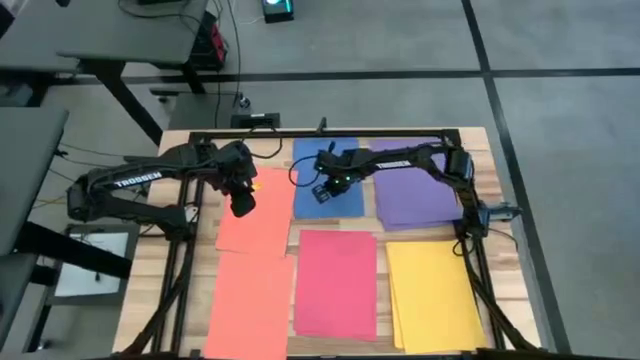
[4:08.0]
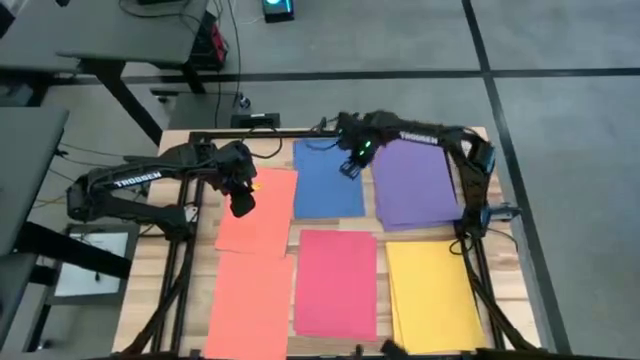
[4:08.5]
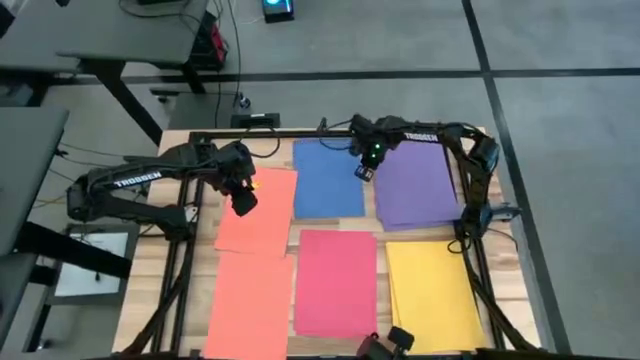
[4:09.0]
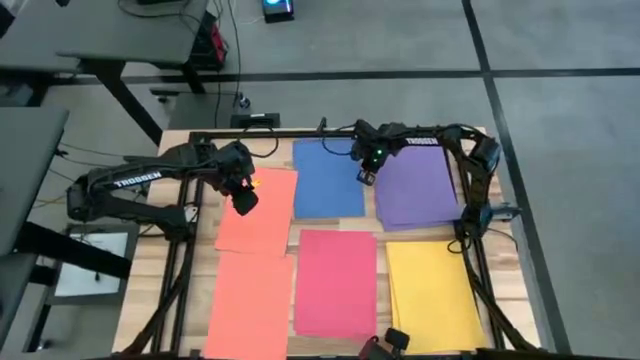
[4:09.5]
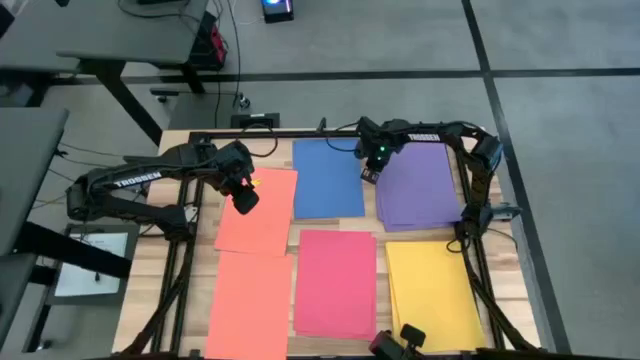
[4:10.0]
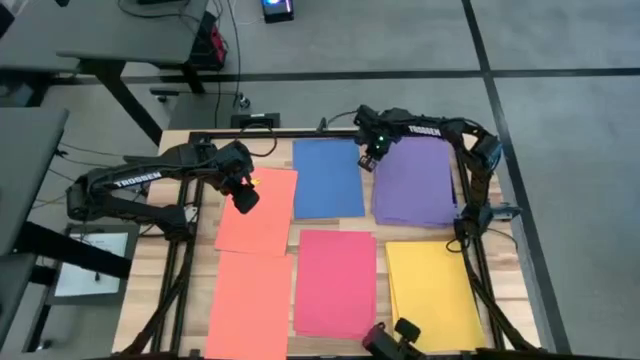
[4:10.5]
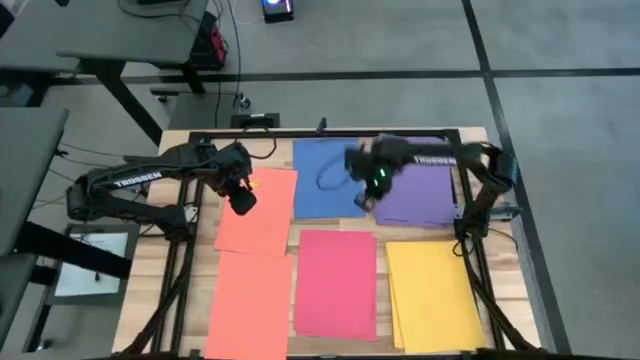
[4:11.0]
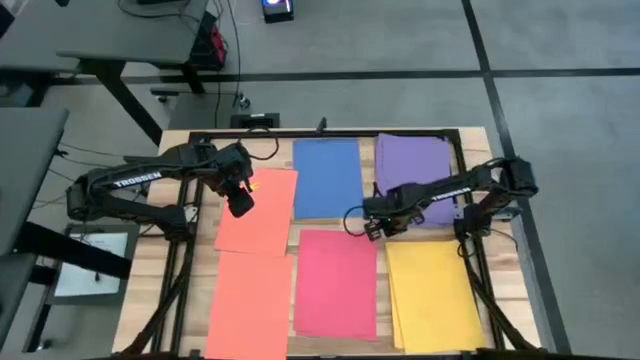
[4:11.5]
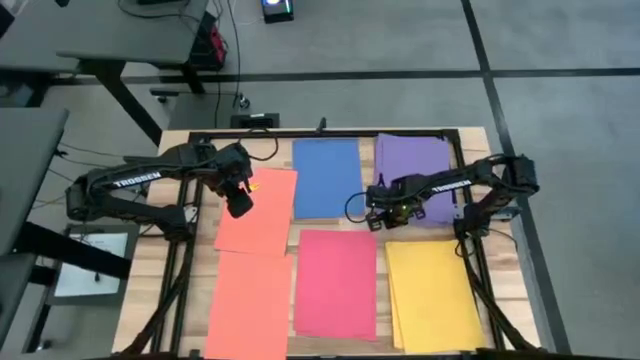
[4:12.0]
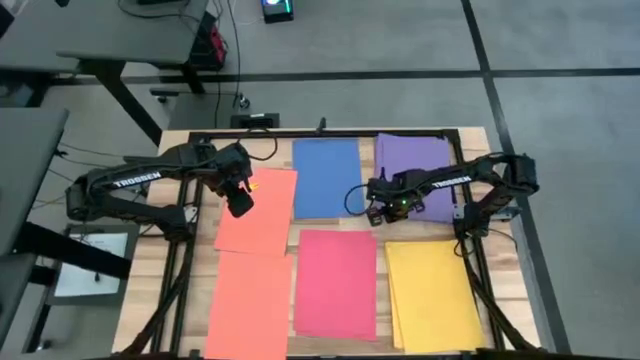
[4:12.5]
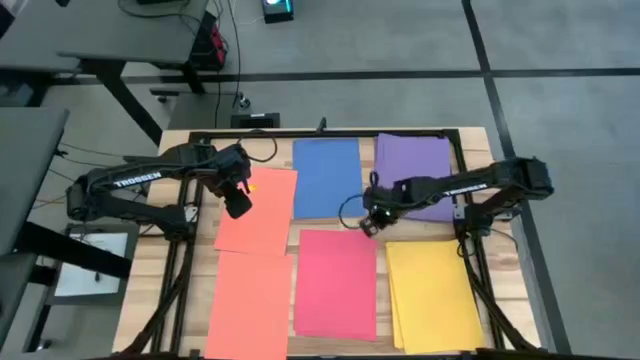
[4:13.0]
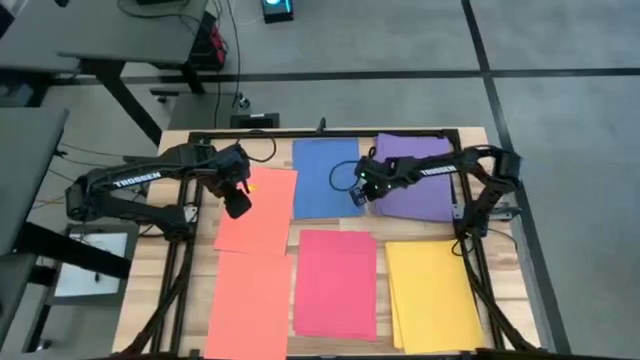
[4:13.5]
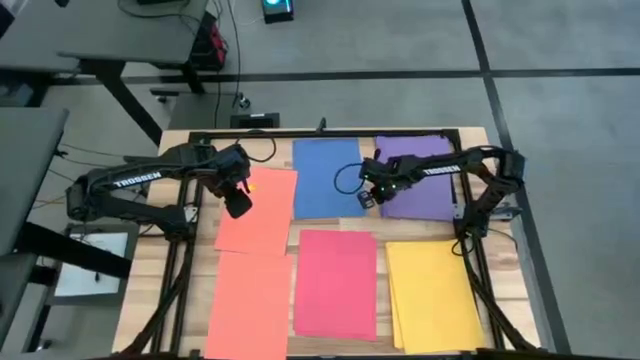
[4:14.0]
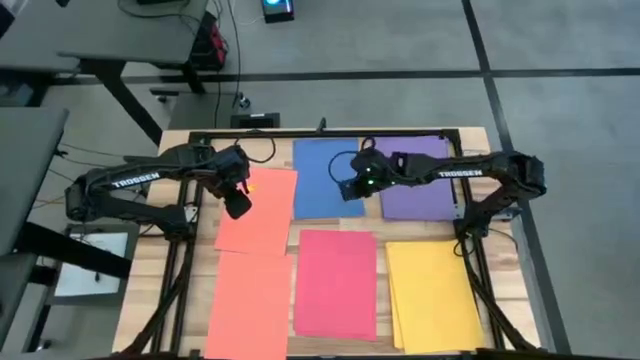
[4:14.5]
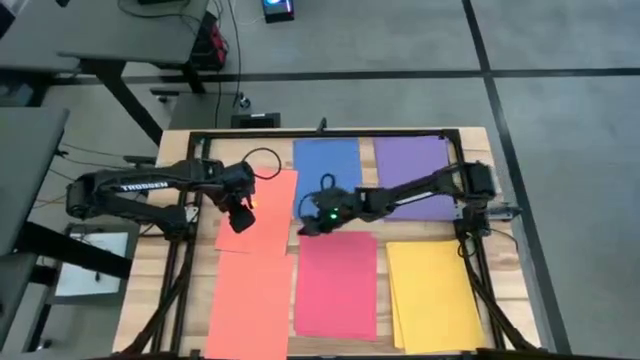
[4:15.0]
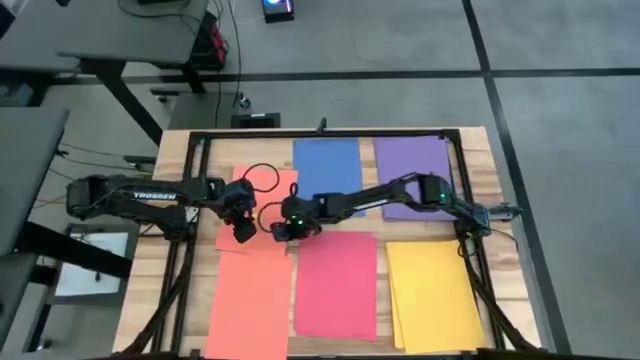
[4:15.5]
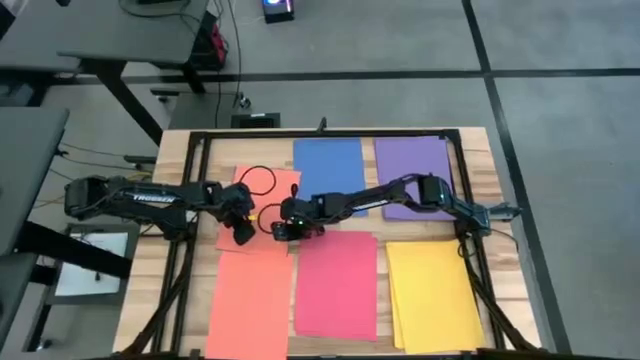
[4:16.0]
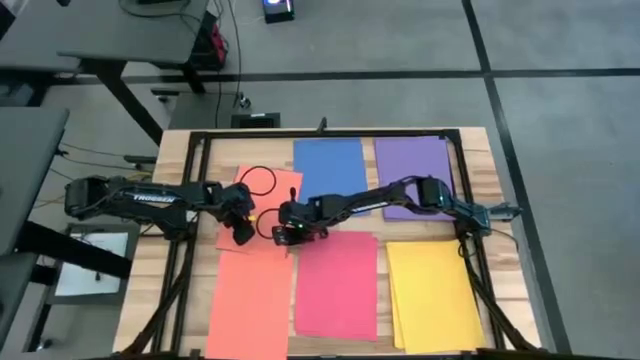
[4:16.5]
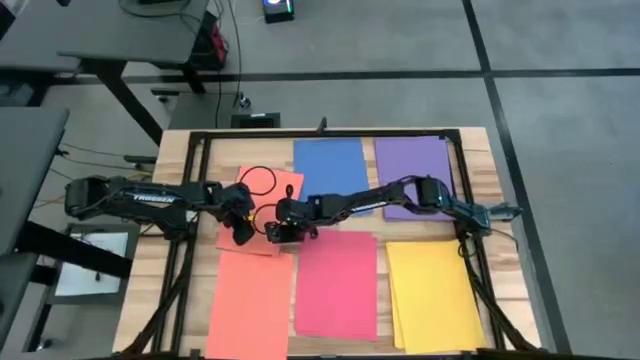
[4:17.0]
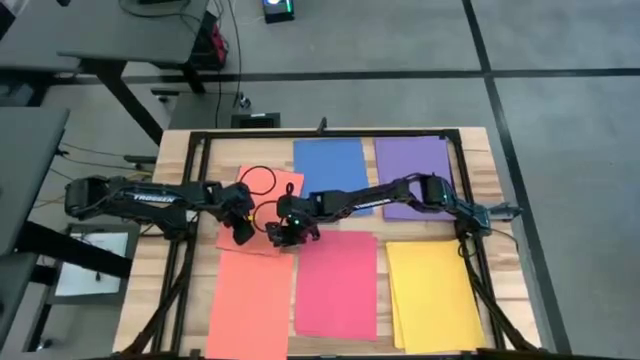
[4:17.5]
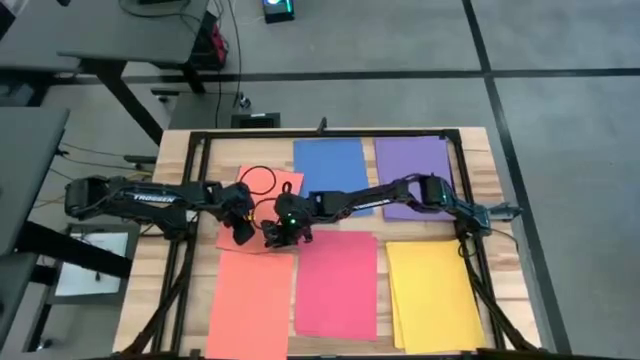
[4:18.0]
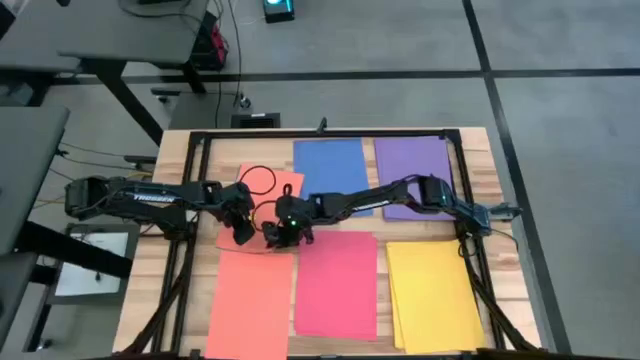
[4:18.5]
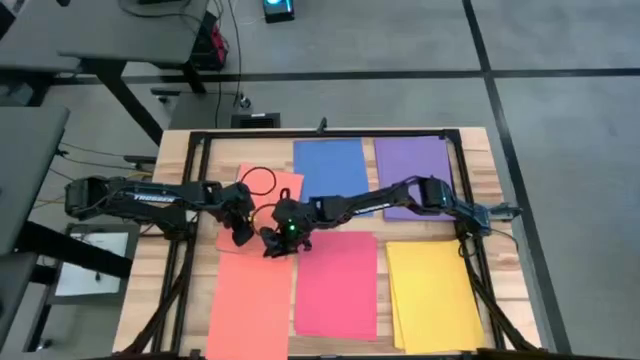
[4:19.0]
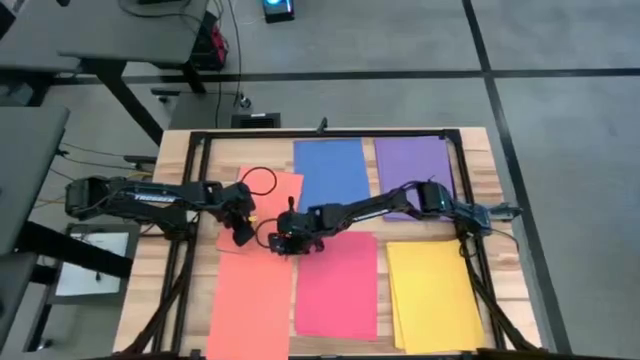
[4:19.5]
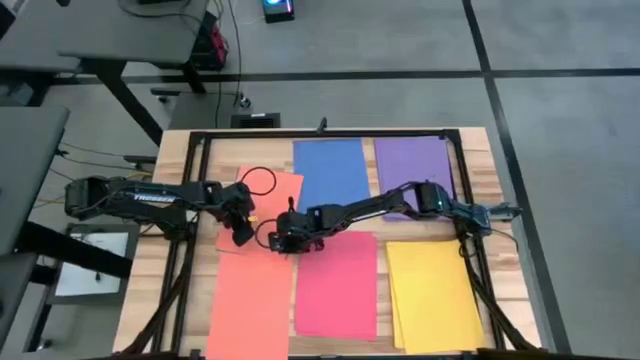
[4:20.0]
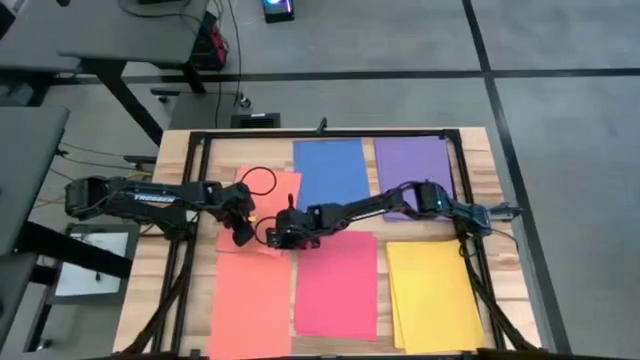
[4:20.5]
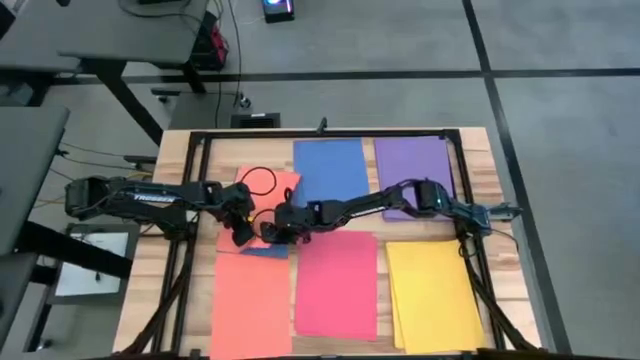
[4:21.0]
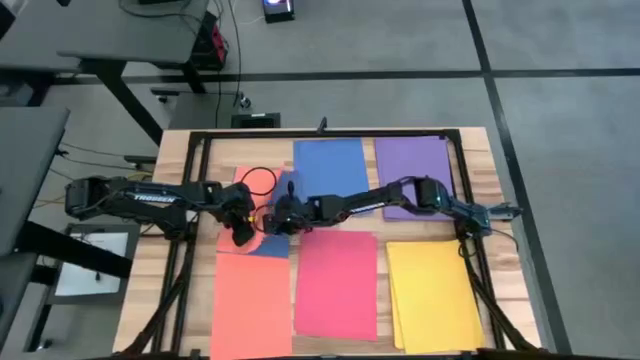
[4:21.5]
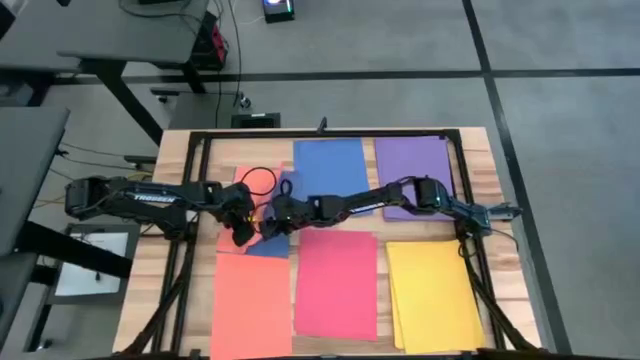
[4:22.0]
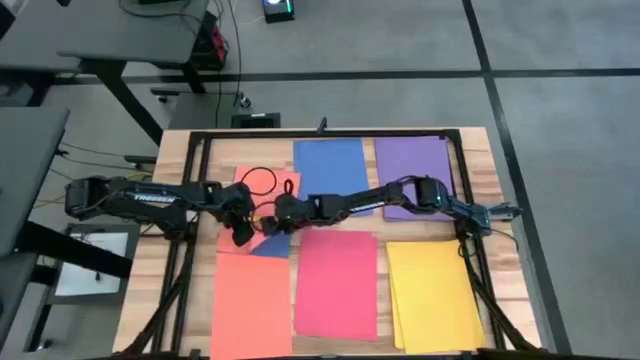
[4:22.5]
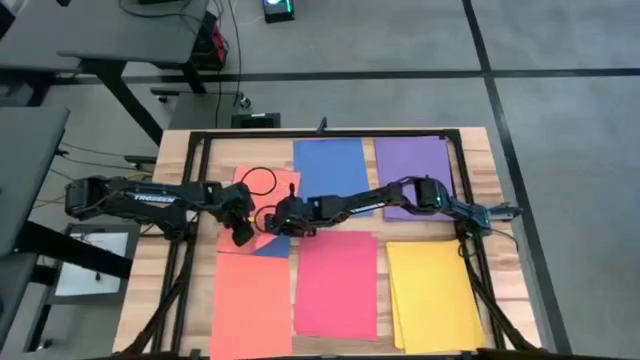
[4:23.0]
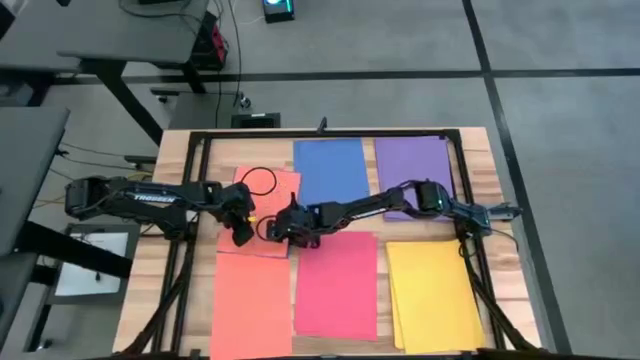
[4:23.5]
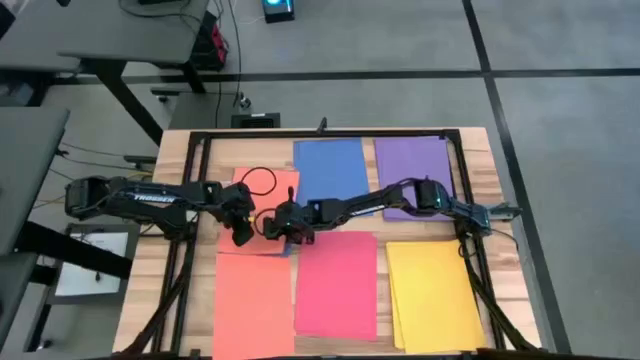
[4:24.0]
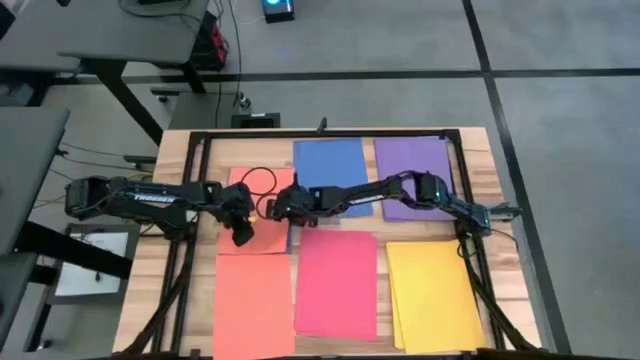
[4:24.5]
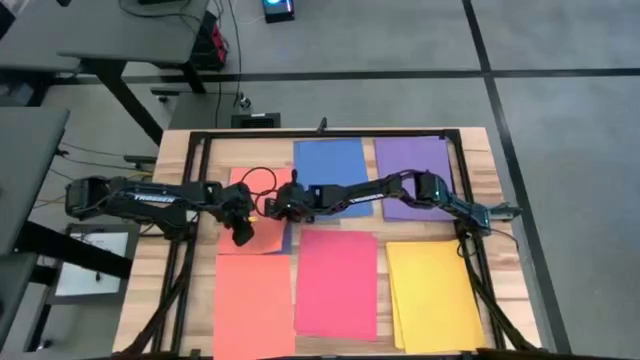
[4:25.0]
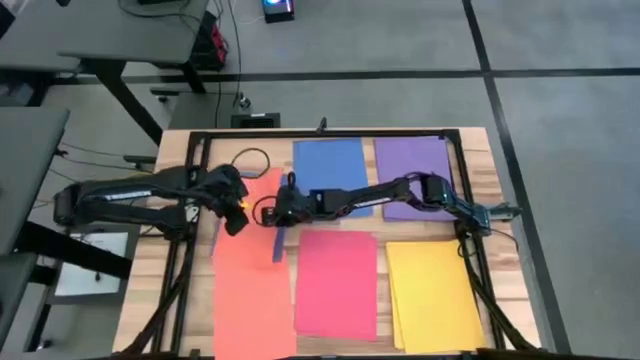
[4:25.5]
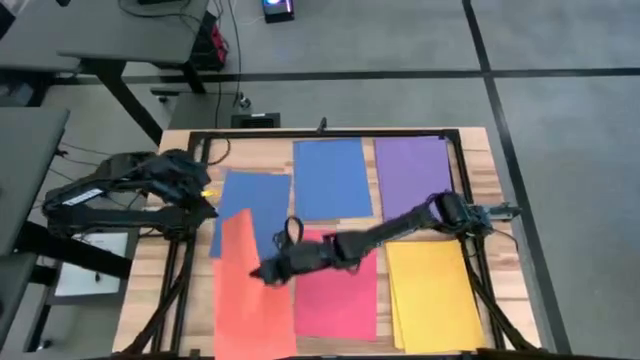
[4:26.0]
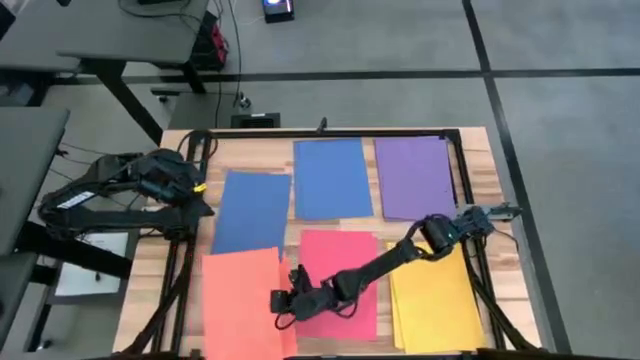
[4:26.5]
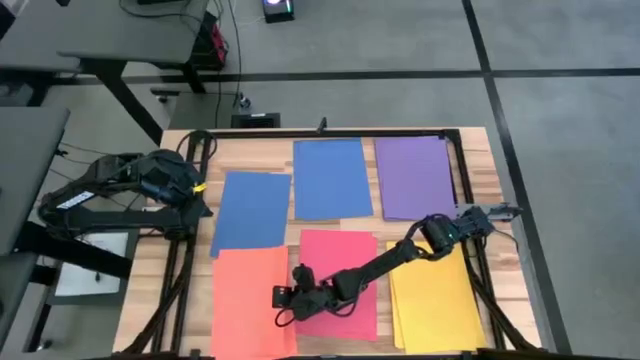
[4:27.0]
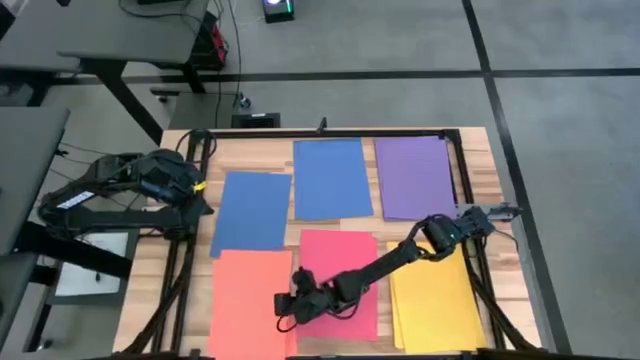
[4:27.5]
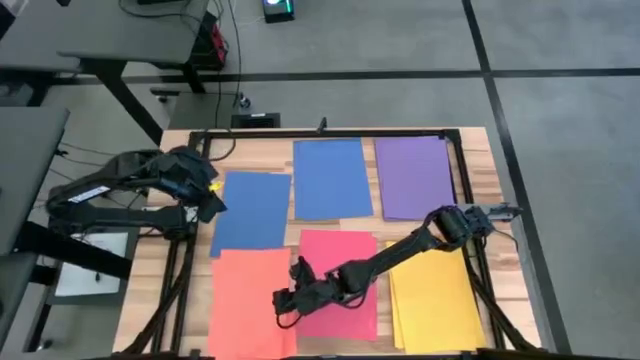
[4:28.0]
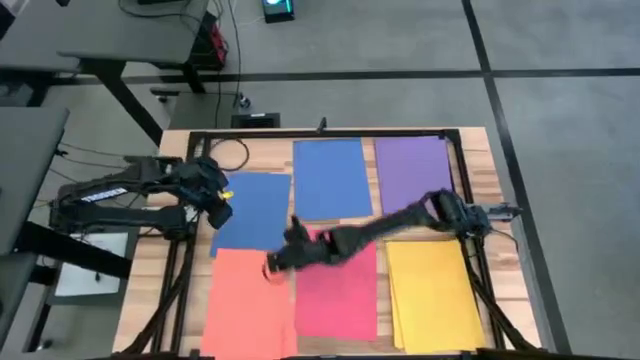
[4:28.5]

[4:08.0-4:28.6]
Task: Organize paper
Stack the orange paper on the bottom left light orange papers

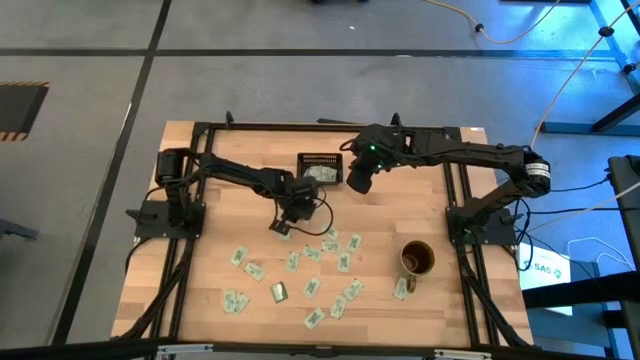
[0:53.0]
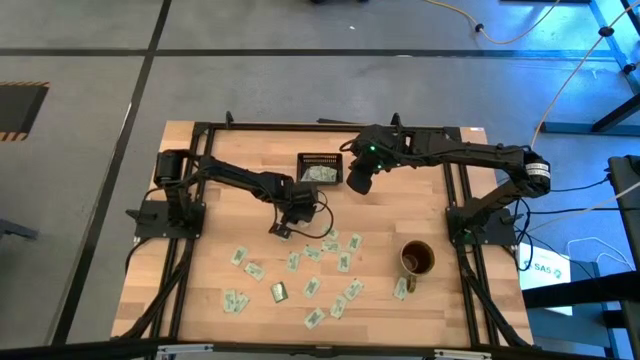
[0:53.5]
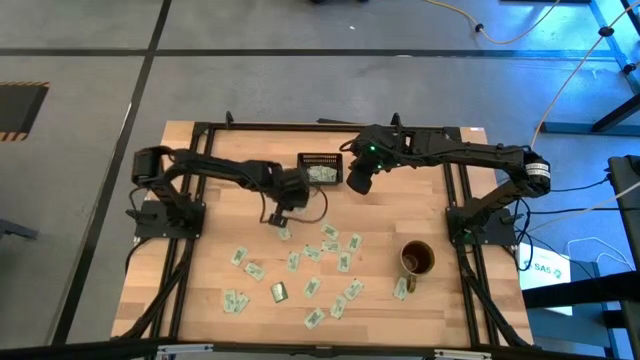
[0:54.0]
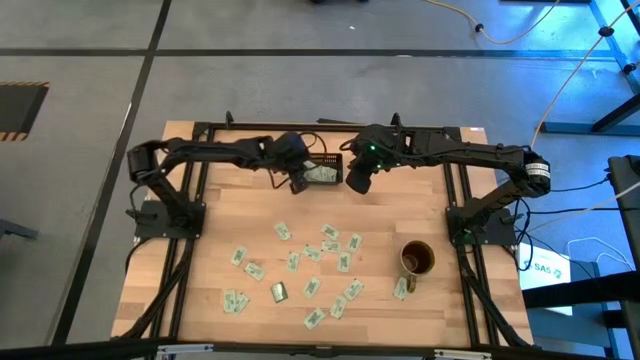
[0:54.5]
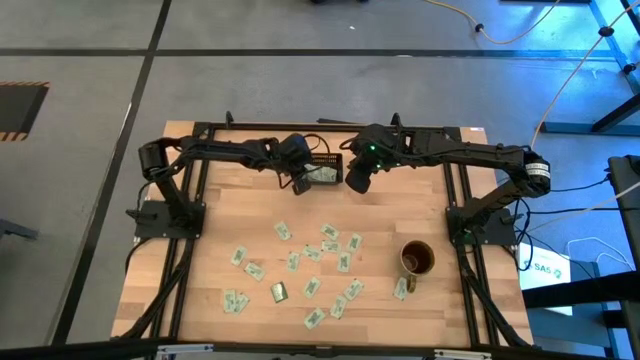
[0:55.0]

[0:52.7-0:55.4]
Task: Pick and place Stevia / Truvia into bins
Put the white stevia packet into the black bin
